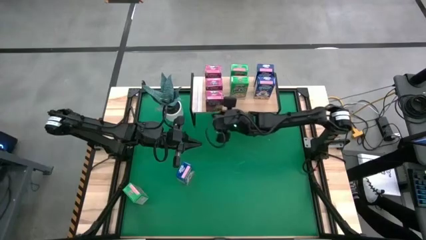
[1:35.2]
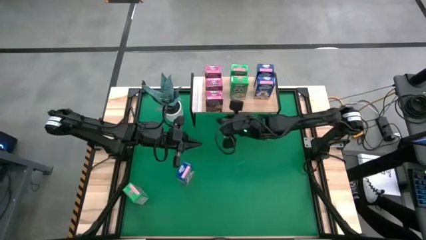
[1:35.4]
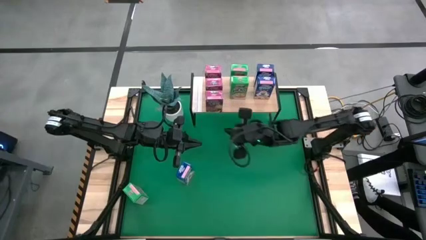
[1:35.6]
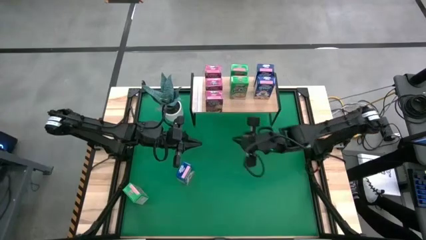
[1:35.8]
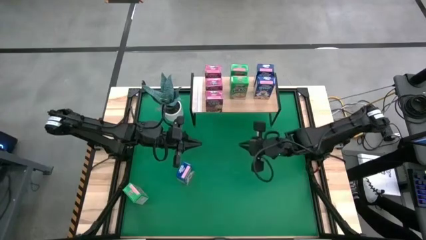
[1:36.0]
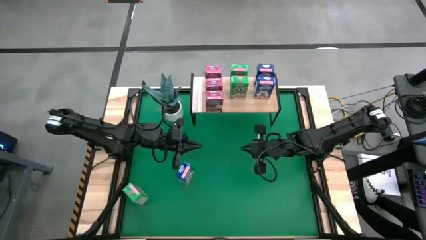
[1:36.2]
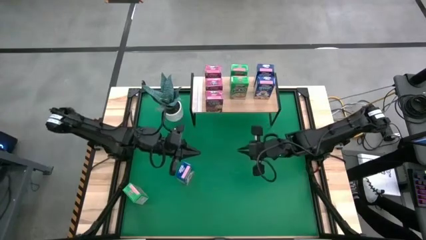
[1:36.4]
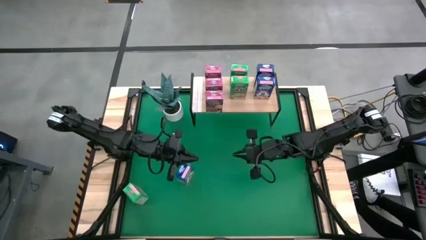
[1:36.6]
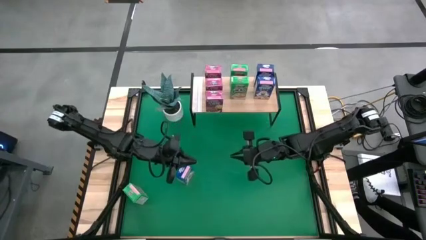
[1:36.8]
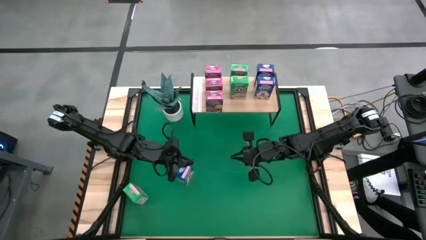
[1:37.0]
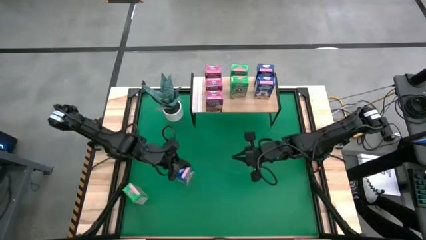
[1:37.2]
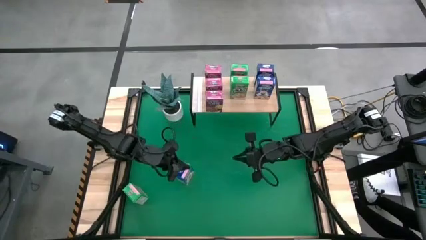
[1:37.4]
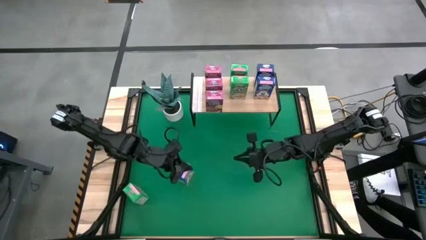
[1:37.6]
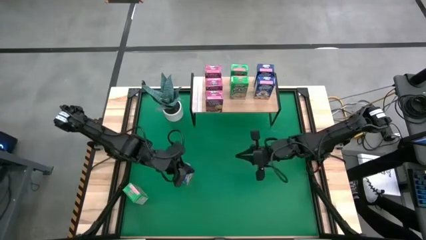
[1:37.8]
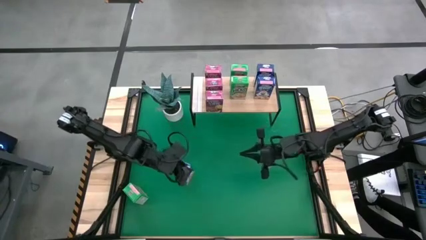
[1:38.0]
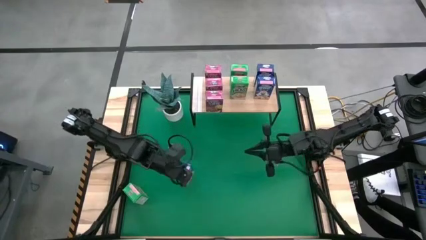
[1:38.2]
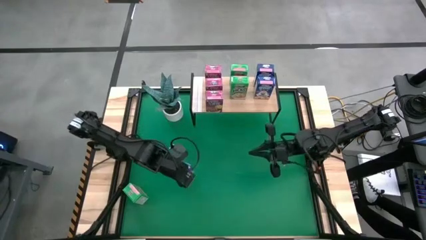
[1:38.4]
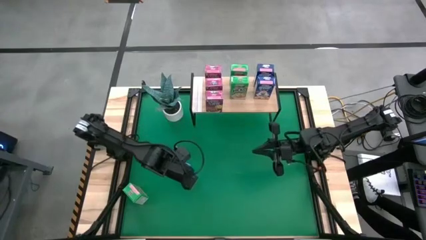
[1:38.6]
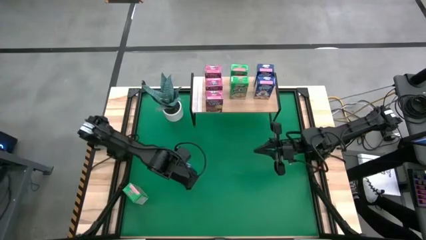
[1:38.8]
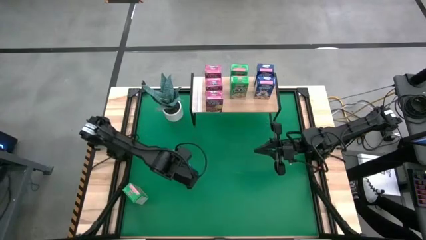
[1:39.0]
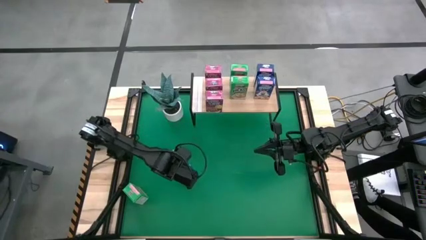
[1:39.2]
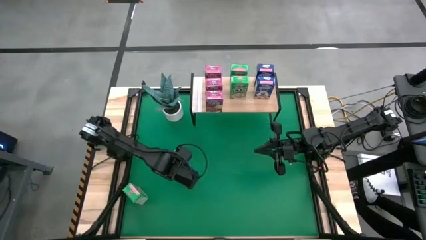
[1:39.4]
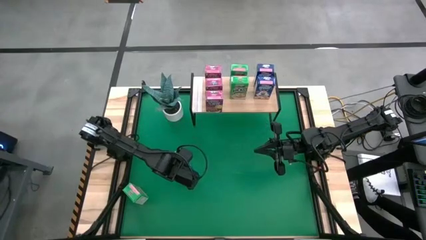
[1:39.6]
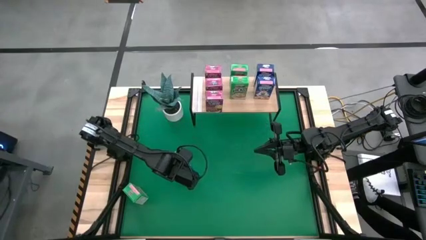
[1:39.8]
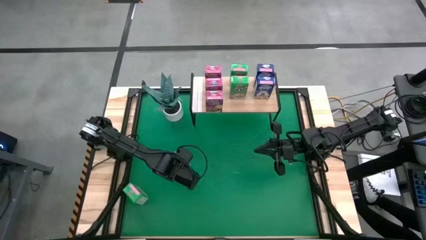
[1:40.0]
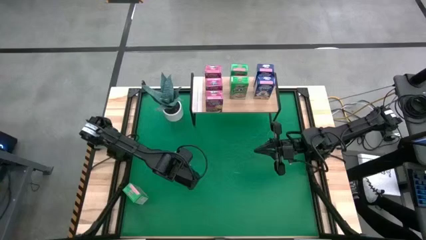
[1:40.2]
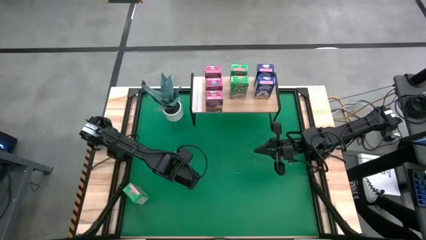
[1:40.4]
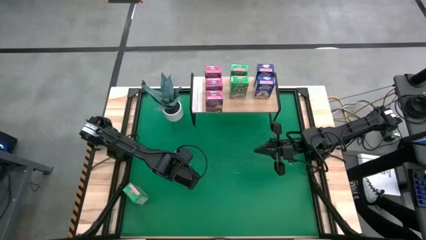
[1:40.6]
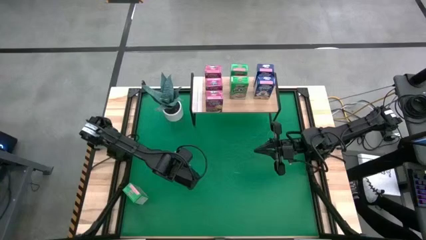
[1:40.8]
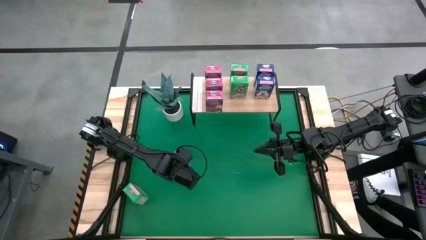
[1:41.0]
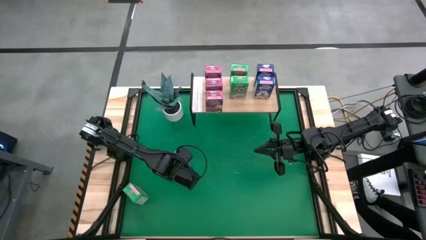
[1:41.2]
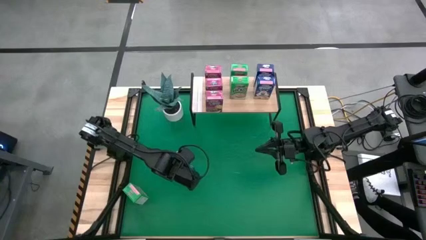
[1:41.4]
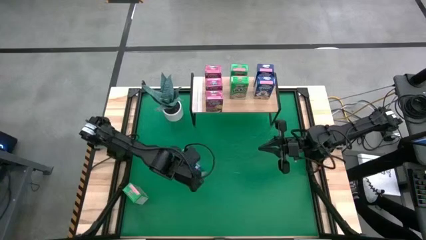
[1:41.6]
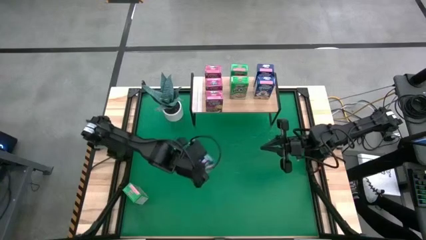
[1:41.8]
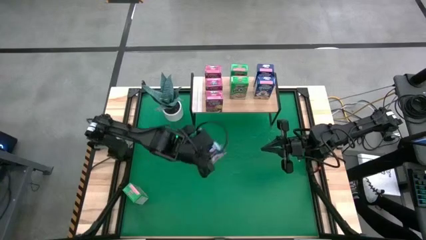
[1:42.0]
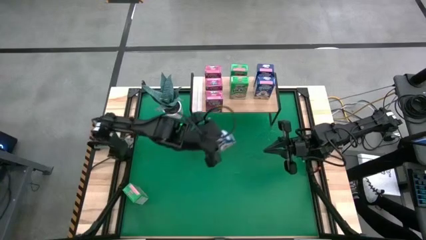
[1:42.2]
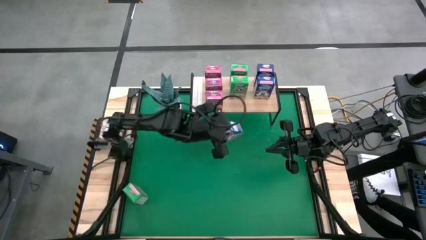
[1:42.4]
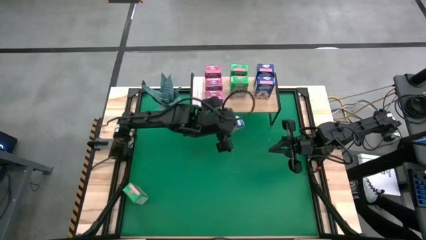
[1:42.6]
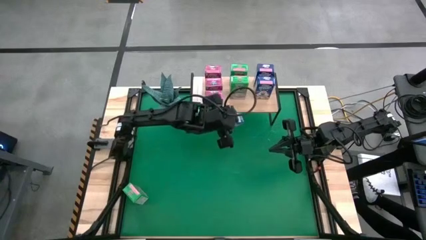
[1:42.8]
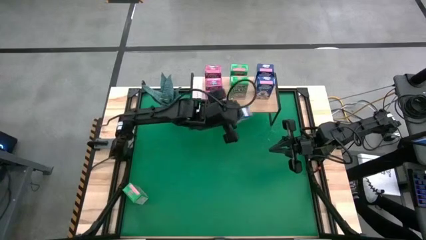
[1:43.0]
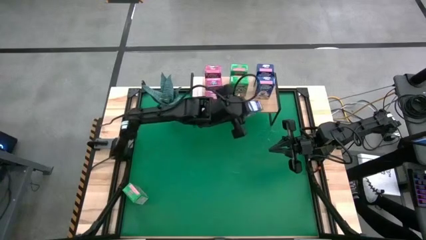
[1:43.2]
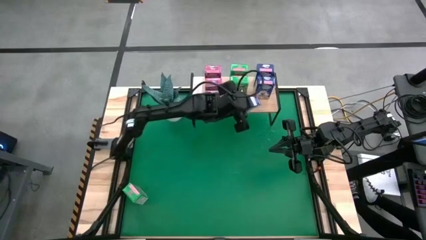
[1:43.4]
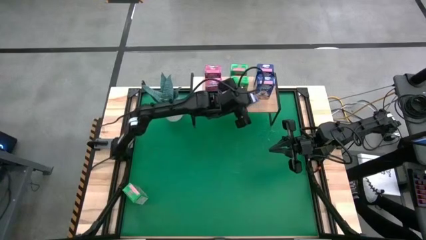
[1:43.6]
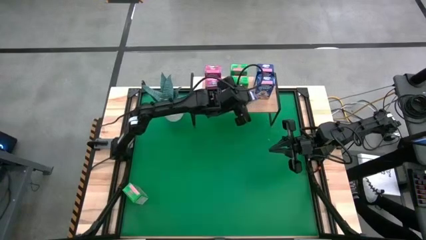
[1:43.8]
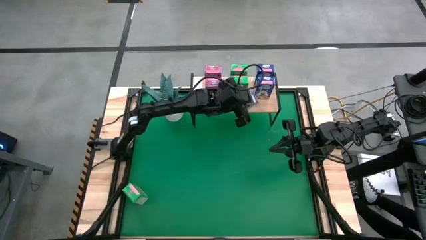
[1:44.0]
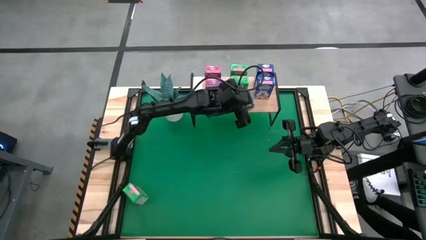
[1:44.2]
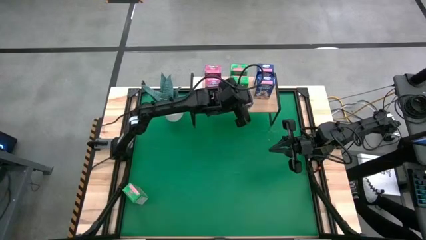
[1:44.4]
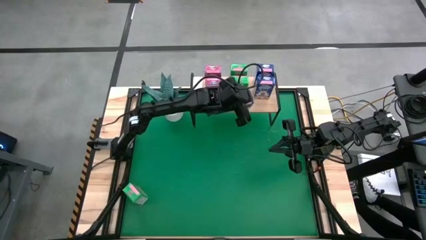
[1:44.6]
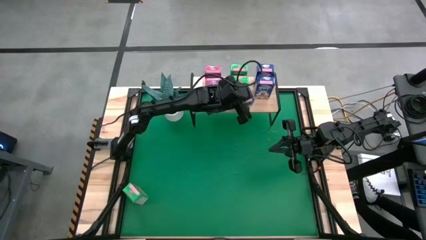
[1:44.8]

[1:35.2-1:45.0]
Task: Stack cereal on shelf
Put the blue cereal box aligned with the other blue cereal boxes on the shelf
